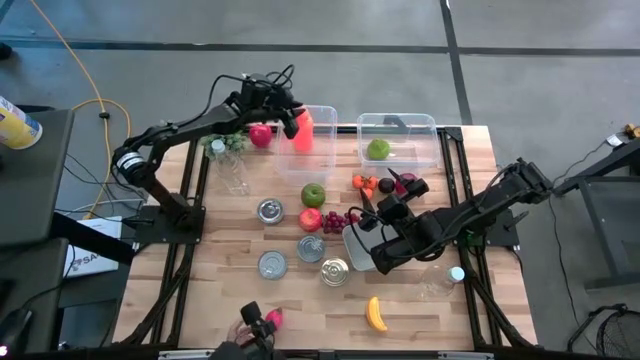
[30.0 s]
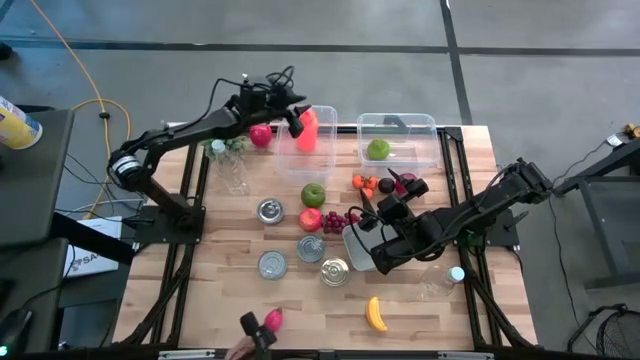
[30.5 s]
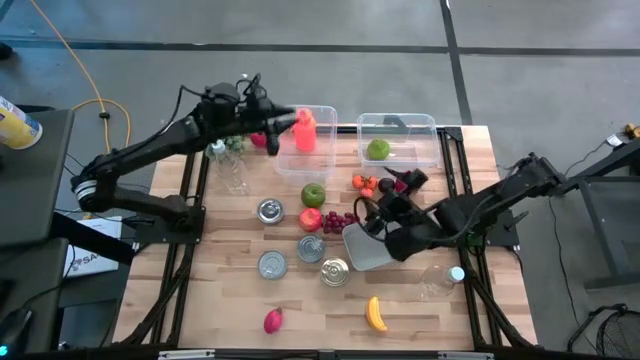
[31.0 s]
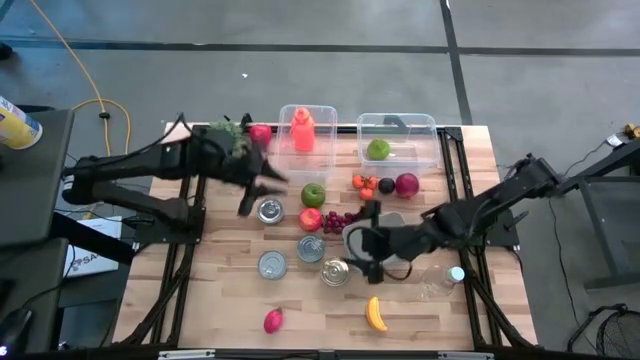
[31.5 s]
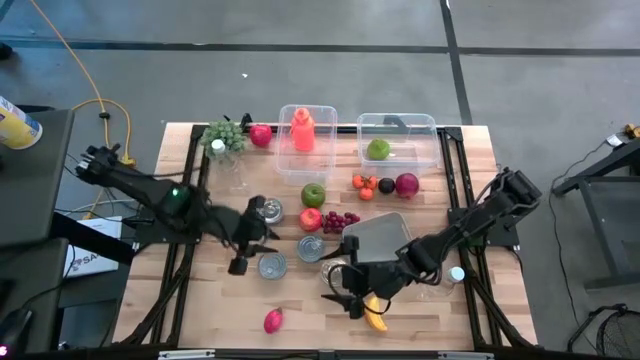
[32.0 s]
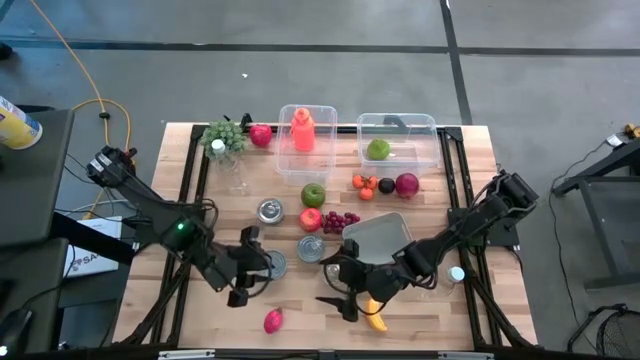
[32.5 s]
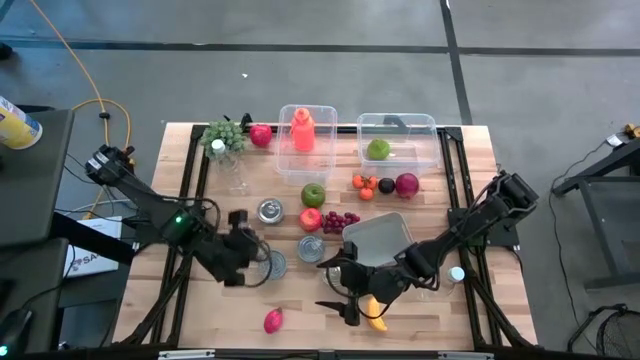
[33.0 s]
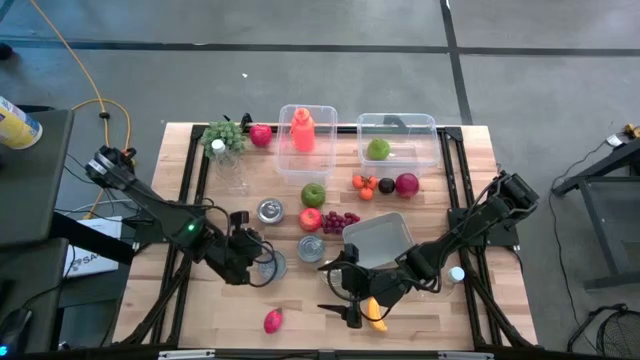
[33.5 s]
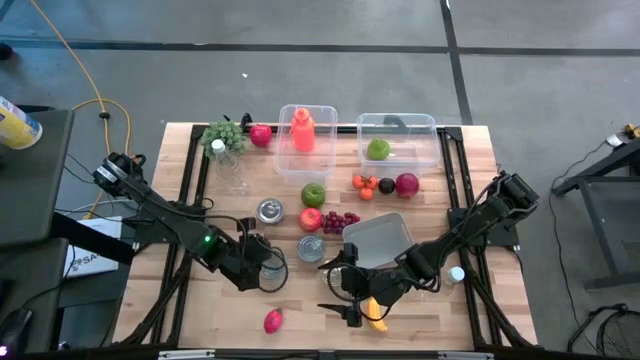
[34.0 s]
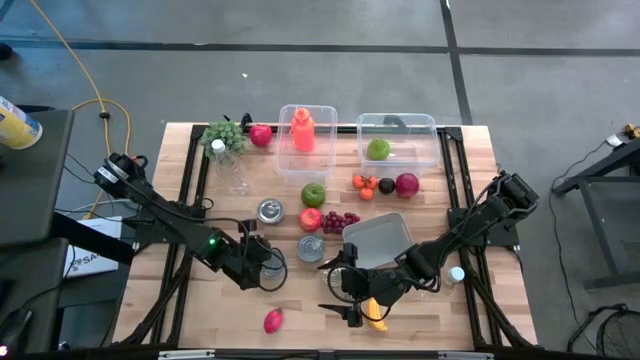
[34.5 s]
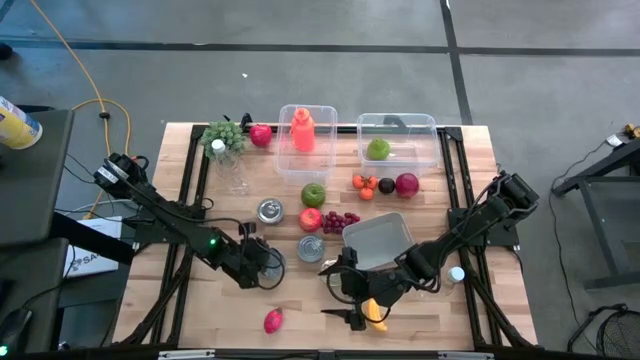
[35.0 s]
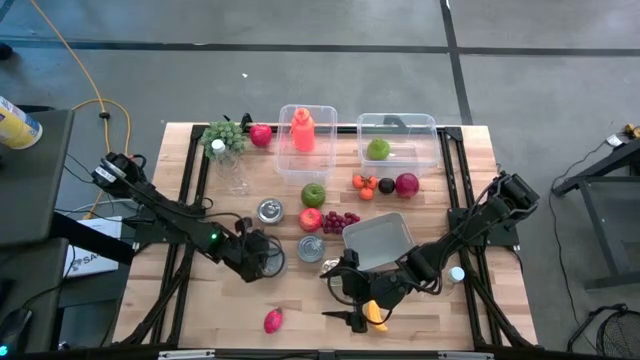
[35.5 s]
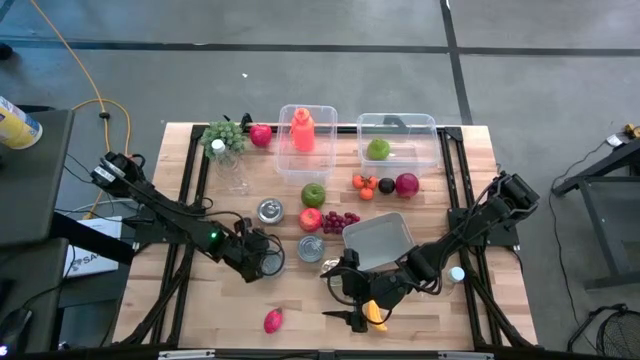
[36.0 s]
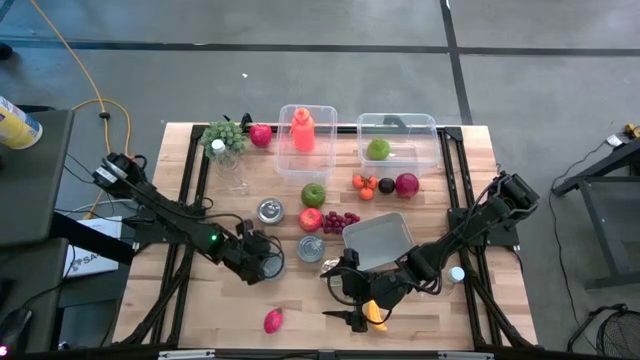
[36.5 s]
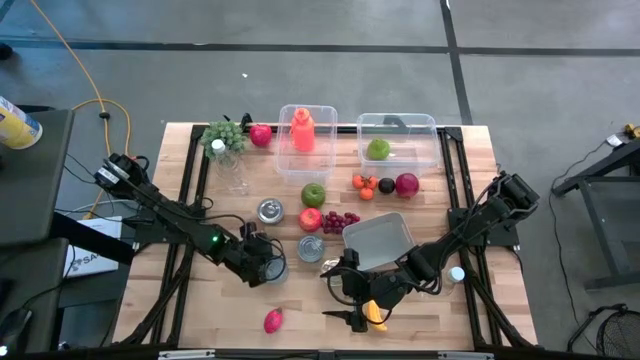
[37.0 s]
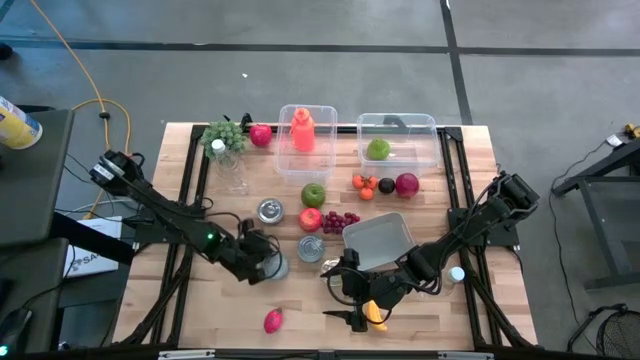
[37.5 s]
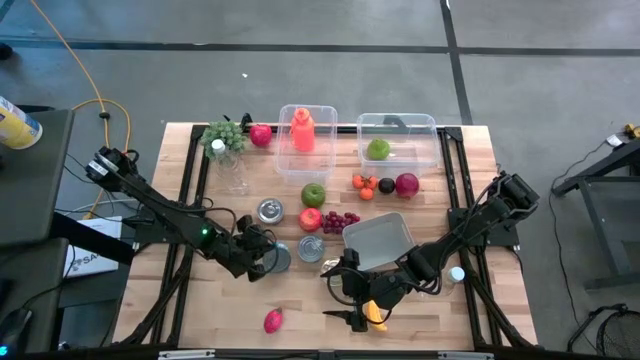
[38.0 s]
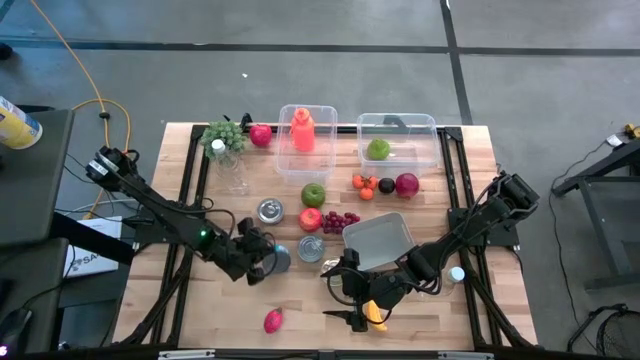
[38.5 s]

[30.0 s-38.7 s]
Task: Pick & Place Food Item
Put the blue tuna can into the gray bin

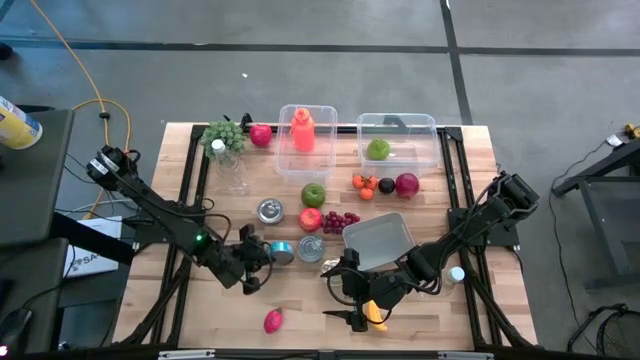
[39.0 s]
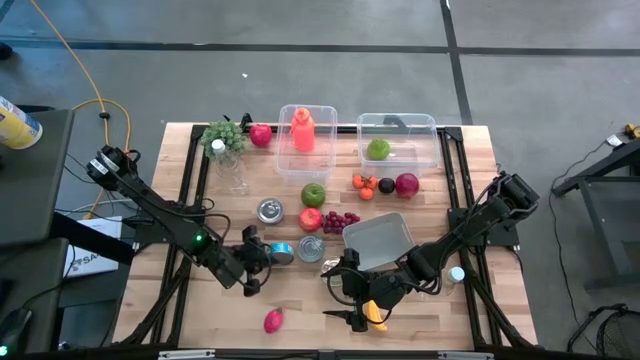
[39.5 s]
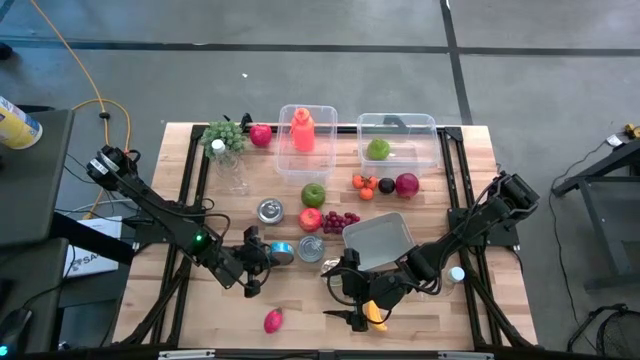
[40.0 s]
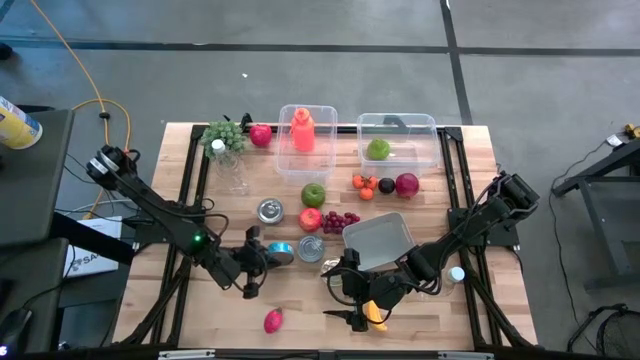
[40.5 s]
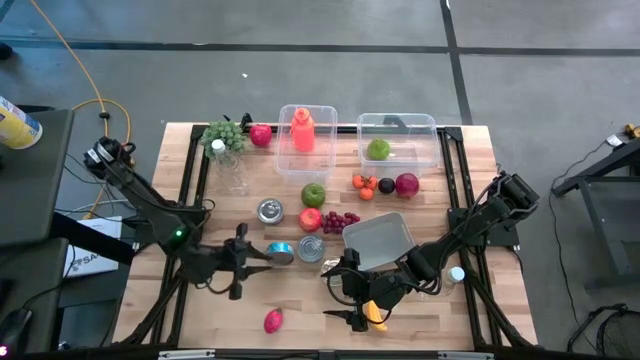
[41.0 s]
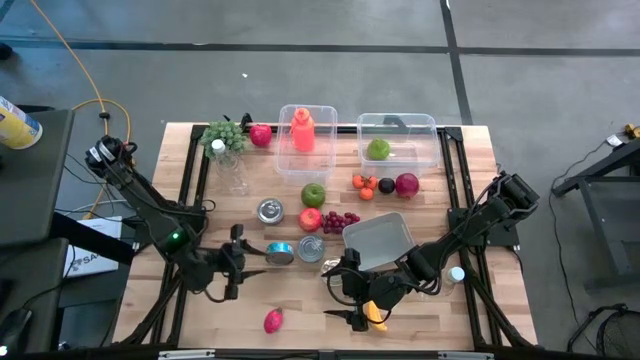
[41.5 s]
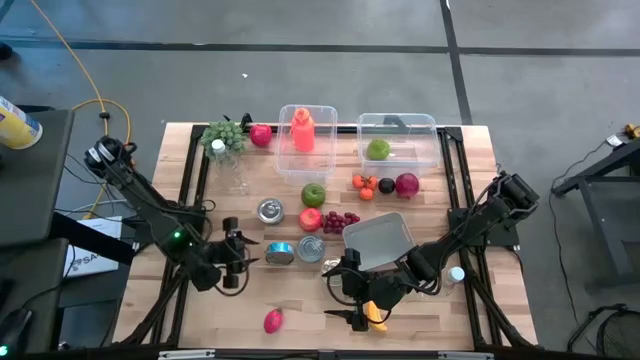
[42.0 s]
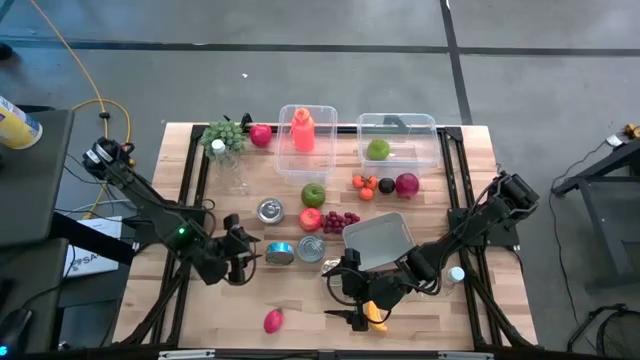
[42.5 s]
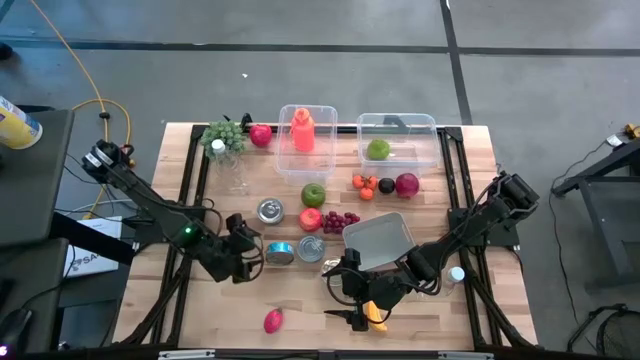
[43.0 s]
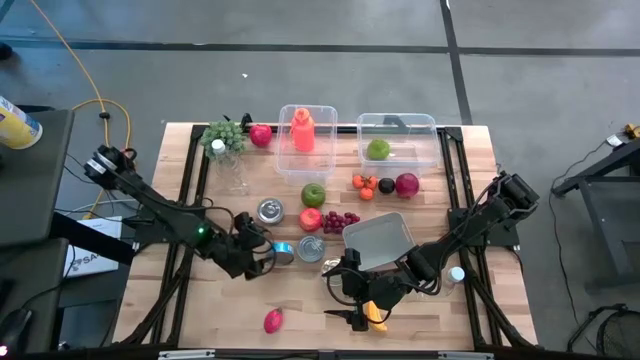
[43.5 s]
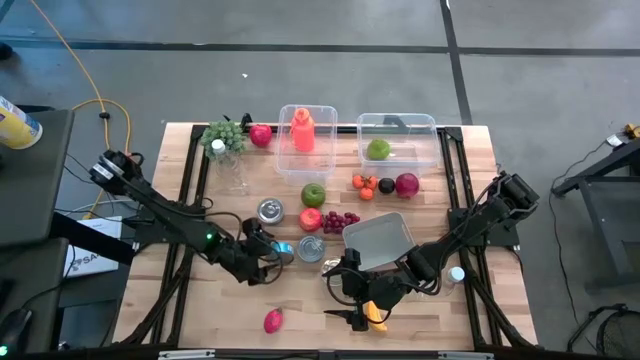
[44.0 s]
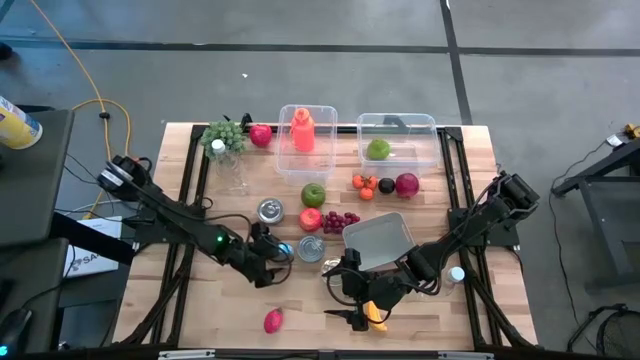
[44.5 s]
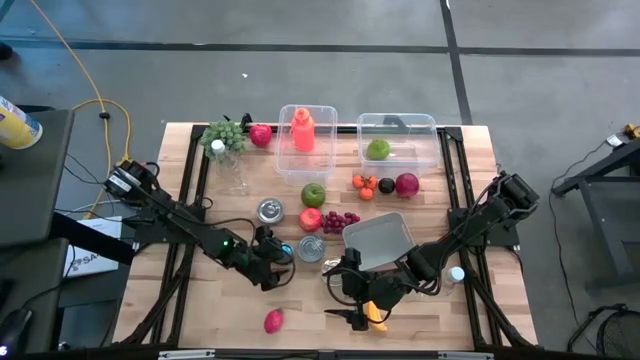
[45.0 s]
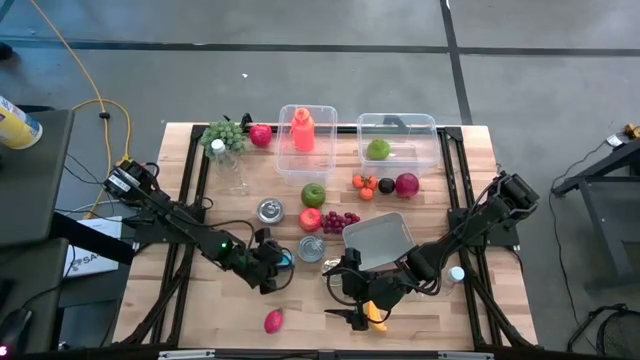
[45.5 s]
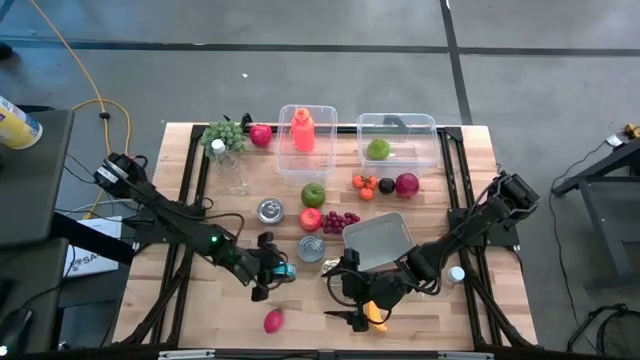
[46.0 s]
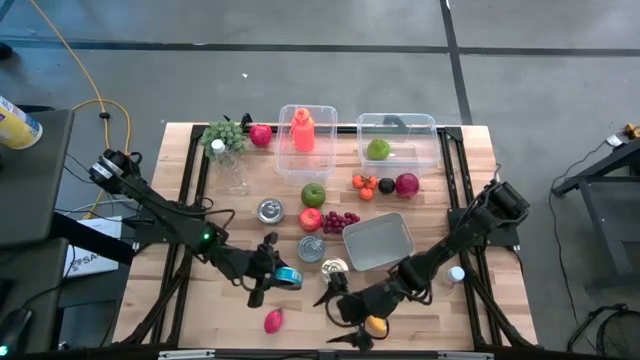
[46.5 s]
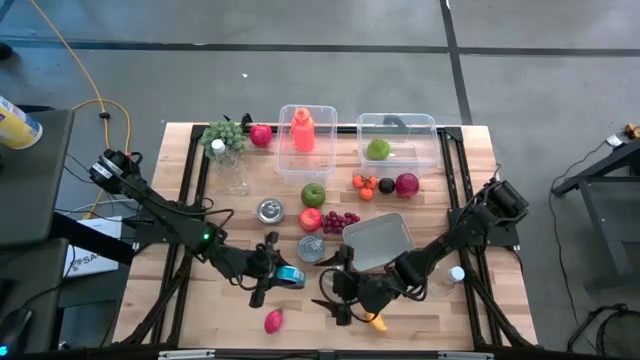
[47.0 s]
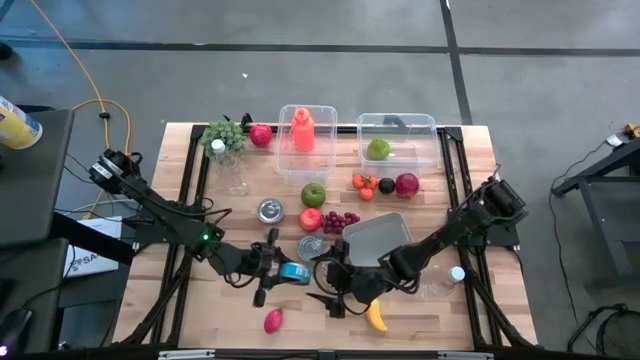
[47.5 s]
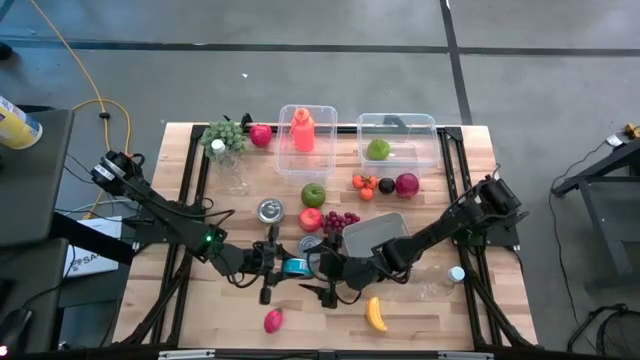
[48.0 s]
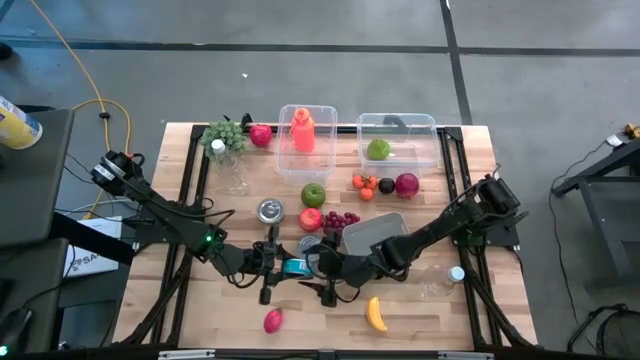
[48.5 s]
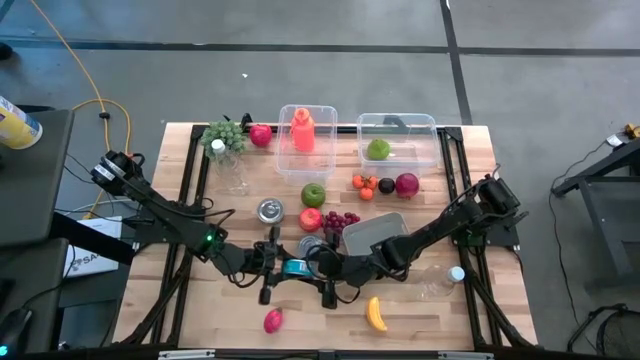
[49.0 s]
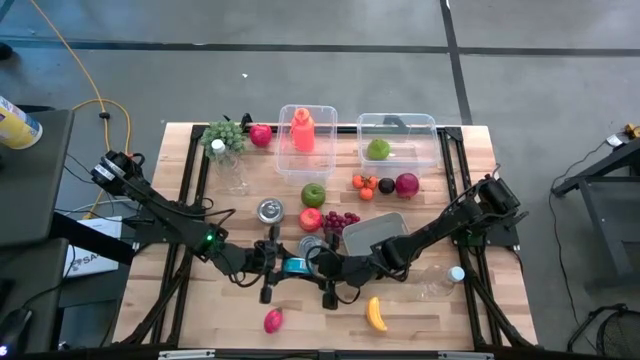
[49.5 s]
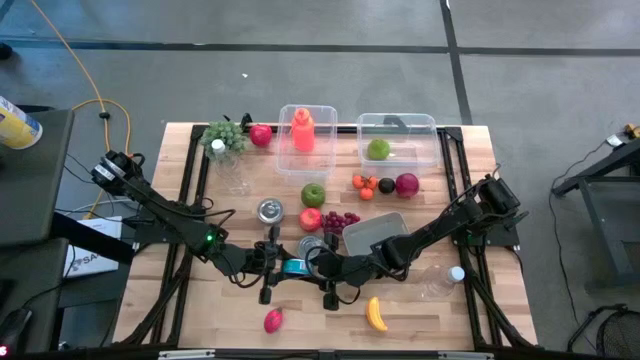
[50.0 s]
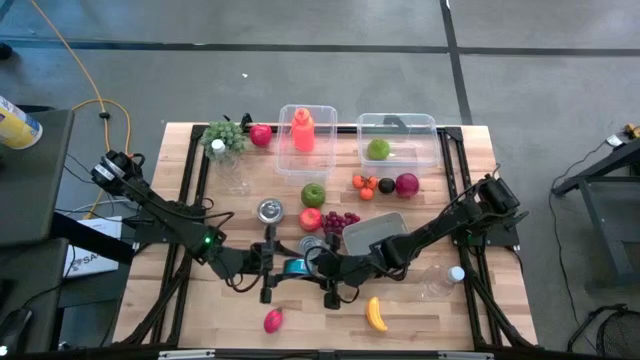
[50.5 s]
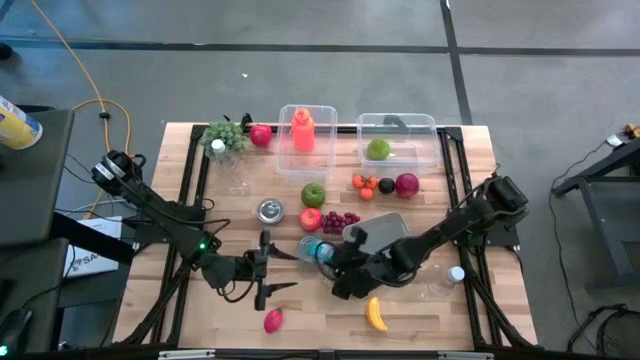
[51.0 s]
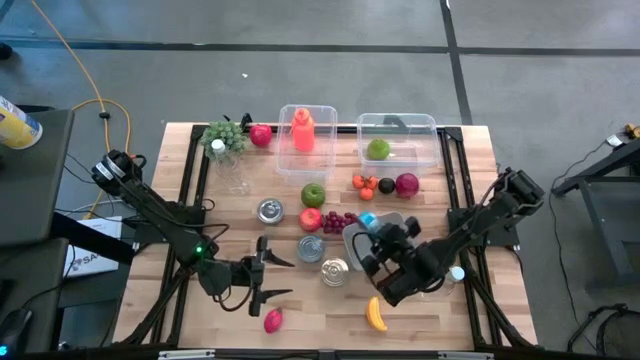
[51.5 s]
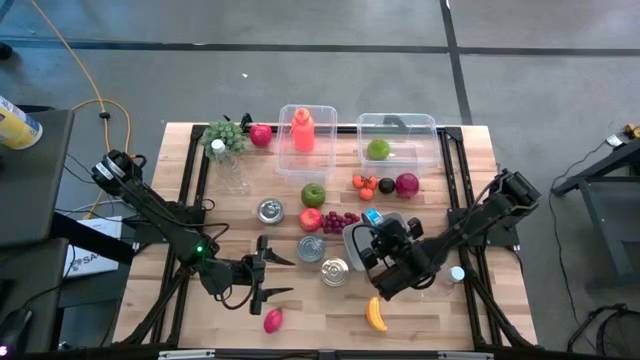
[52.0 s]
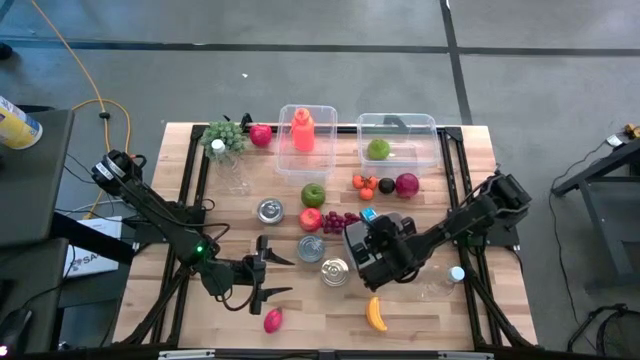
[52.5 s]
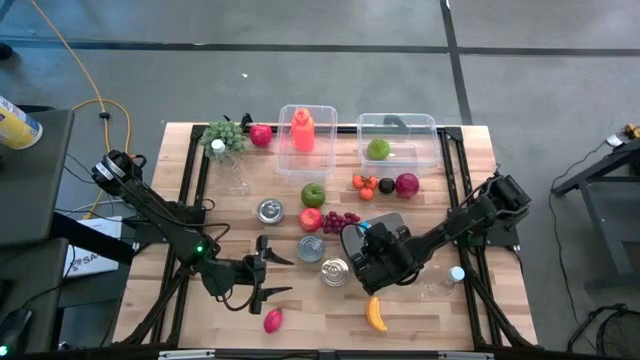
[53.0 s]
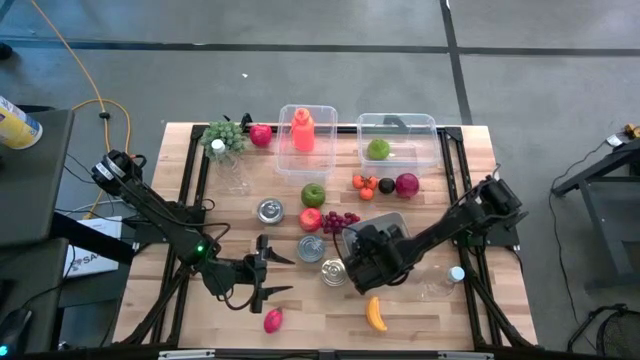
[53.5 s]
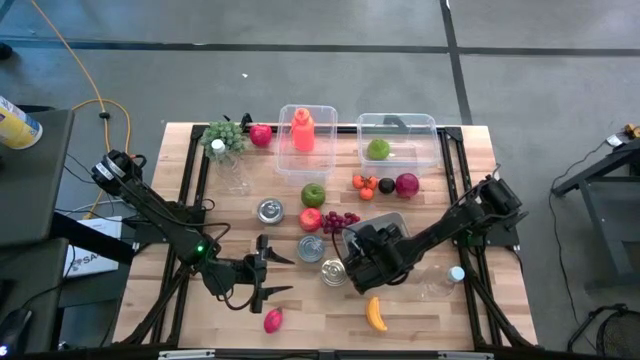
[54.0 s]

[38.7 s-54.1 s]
Put the blue tuna can into the gray bin
